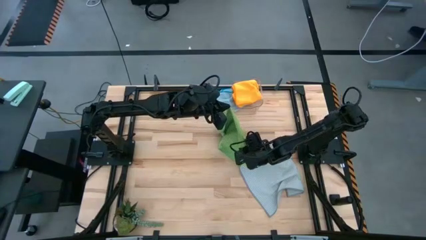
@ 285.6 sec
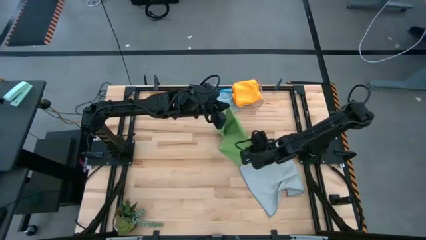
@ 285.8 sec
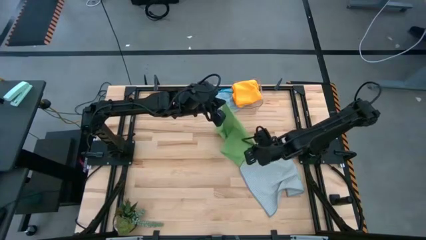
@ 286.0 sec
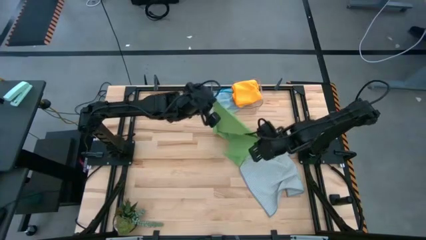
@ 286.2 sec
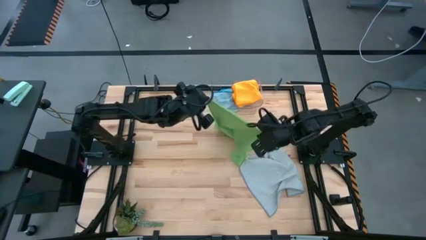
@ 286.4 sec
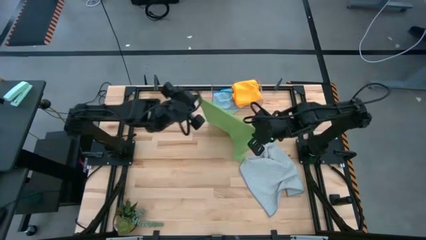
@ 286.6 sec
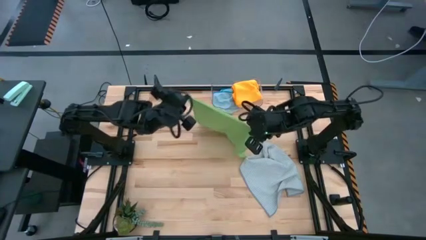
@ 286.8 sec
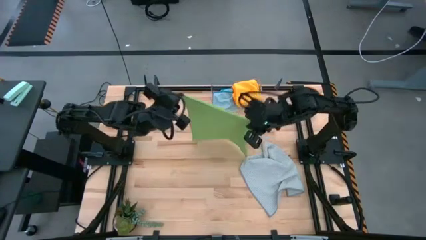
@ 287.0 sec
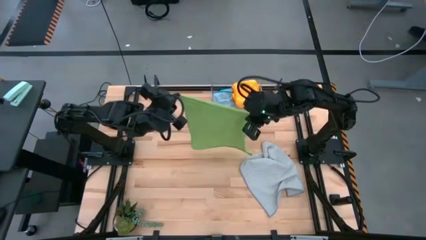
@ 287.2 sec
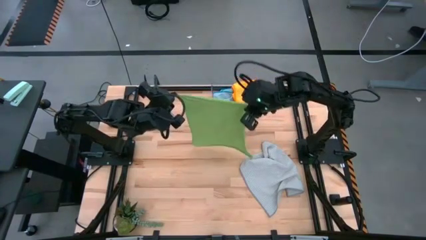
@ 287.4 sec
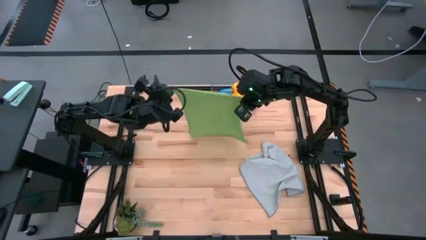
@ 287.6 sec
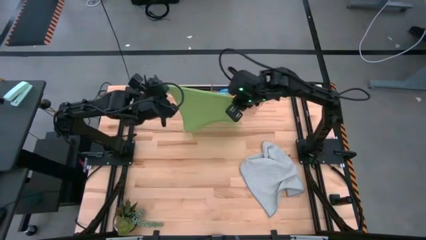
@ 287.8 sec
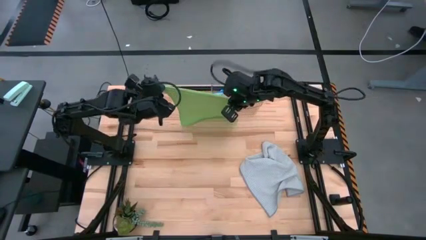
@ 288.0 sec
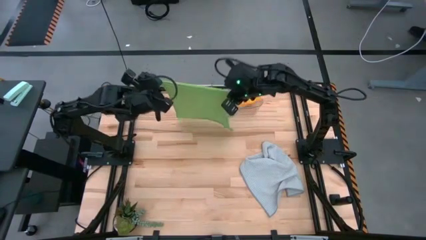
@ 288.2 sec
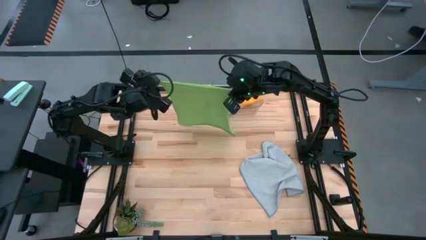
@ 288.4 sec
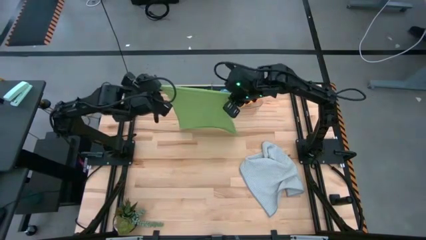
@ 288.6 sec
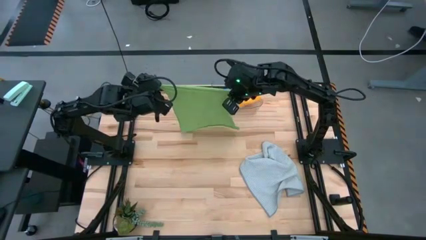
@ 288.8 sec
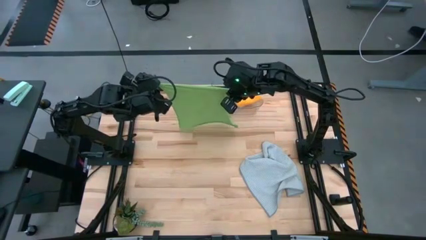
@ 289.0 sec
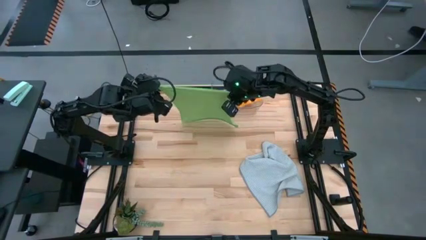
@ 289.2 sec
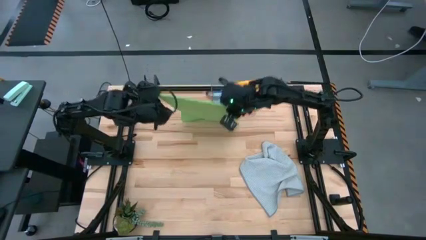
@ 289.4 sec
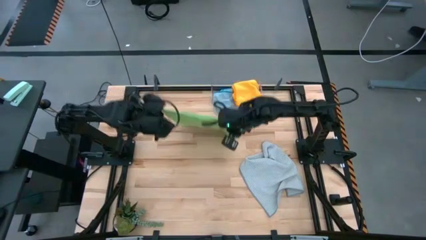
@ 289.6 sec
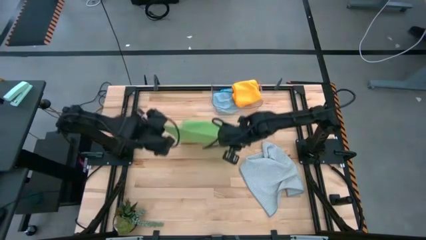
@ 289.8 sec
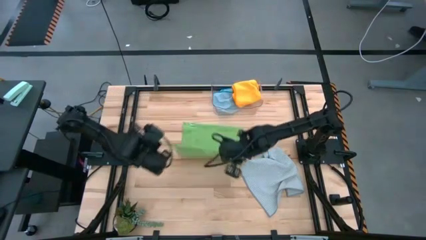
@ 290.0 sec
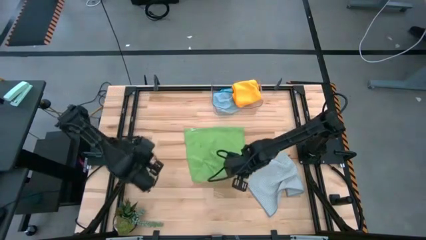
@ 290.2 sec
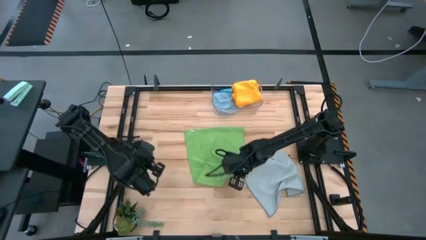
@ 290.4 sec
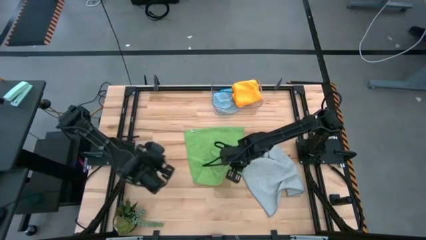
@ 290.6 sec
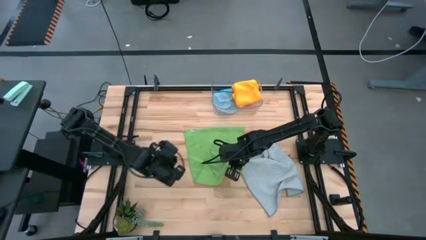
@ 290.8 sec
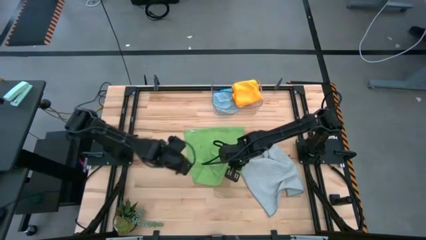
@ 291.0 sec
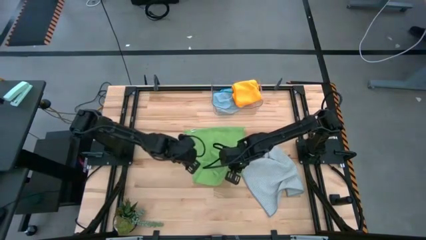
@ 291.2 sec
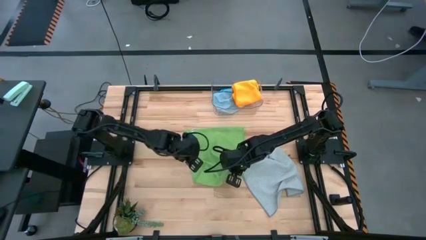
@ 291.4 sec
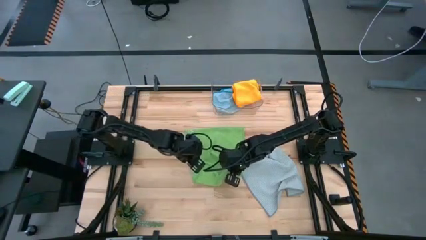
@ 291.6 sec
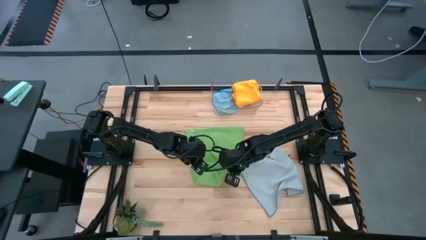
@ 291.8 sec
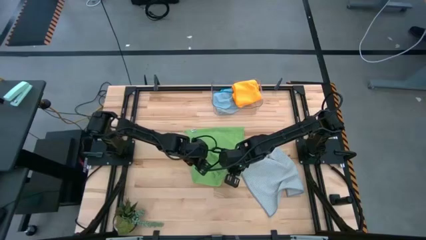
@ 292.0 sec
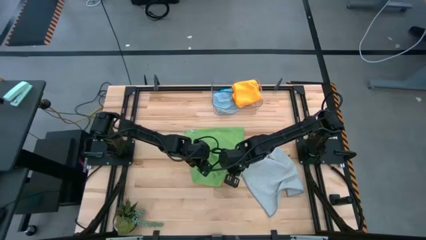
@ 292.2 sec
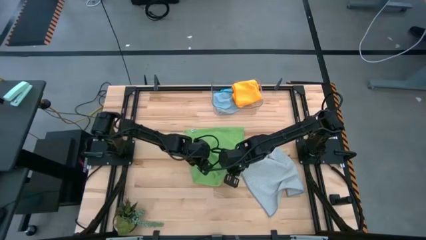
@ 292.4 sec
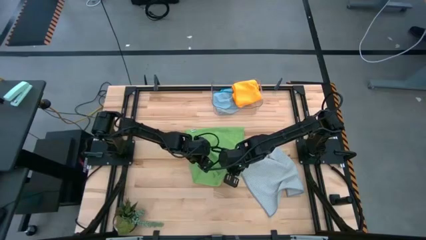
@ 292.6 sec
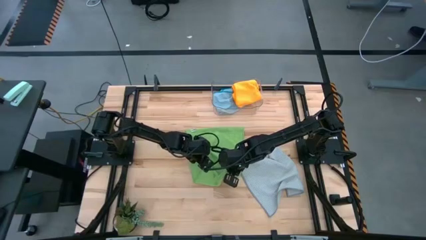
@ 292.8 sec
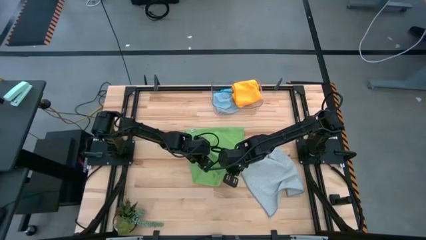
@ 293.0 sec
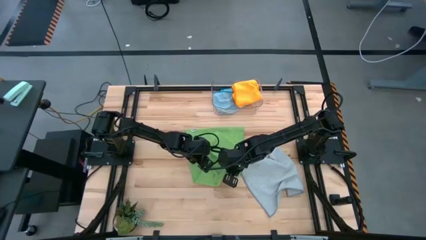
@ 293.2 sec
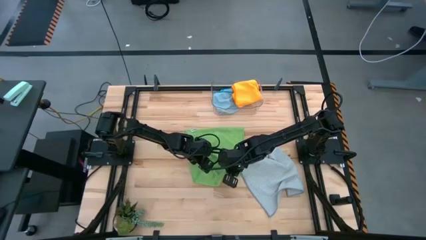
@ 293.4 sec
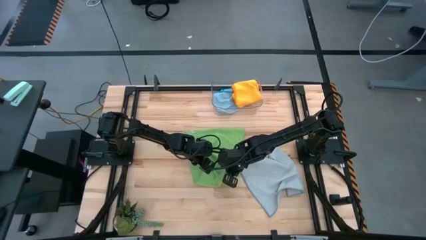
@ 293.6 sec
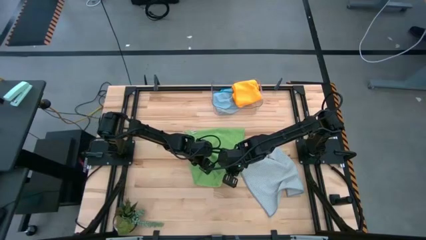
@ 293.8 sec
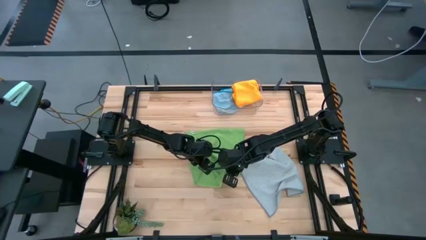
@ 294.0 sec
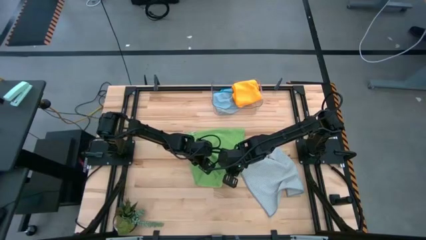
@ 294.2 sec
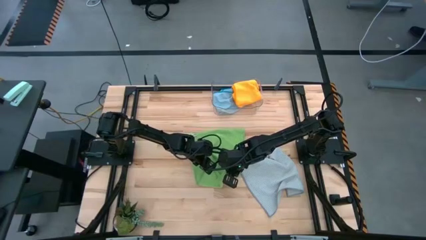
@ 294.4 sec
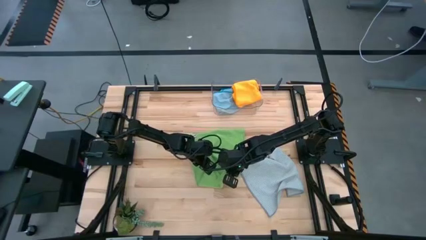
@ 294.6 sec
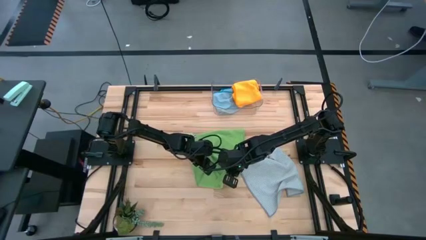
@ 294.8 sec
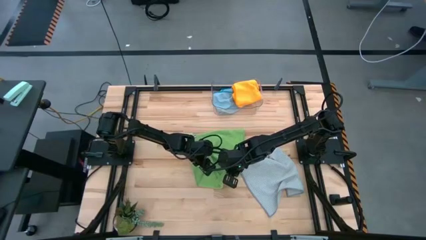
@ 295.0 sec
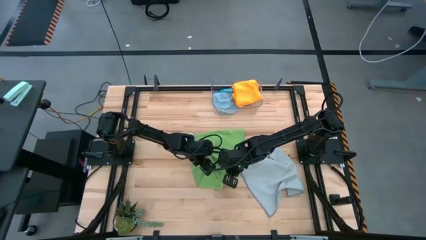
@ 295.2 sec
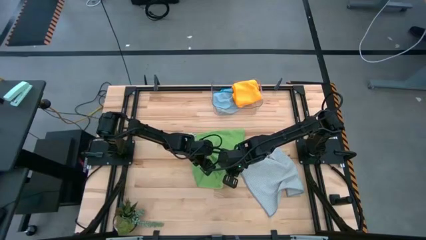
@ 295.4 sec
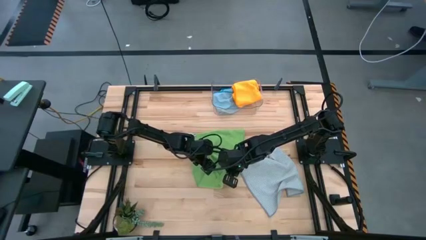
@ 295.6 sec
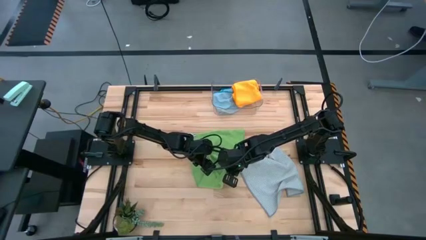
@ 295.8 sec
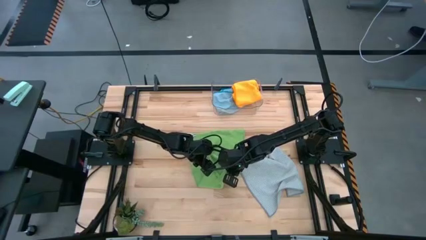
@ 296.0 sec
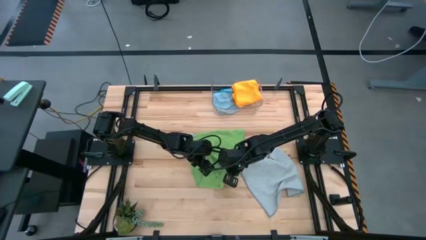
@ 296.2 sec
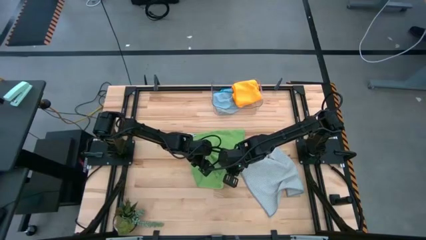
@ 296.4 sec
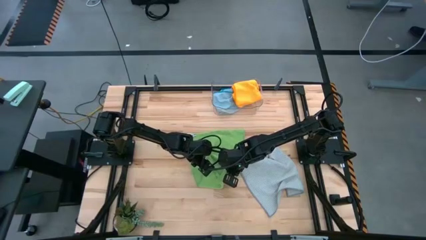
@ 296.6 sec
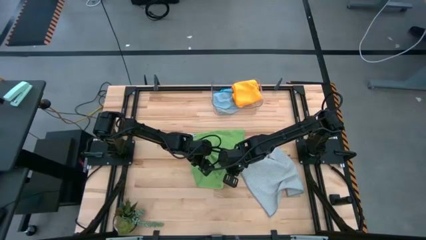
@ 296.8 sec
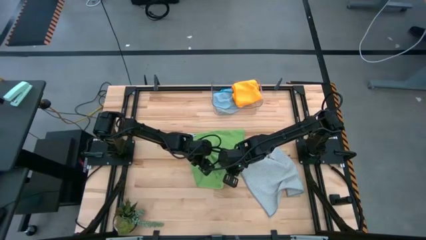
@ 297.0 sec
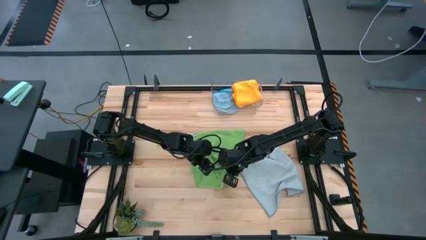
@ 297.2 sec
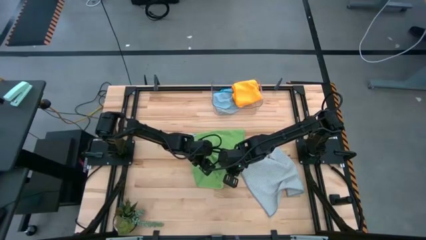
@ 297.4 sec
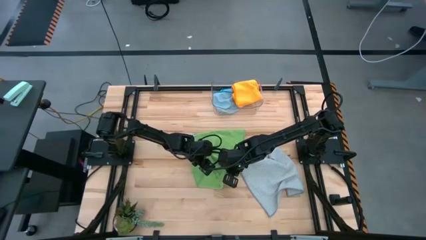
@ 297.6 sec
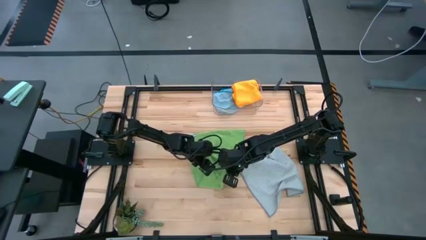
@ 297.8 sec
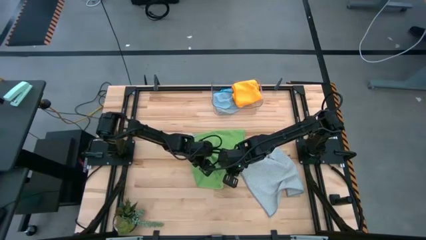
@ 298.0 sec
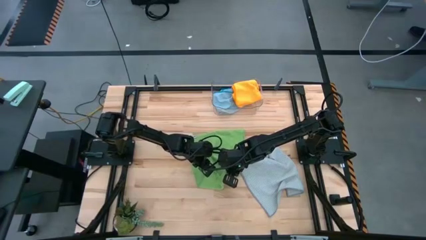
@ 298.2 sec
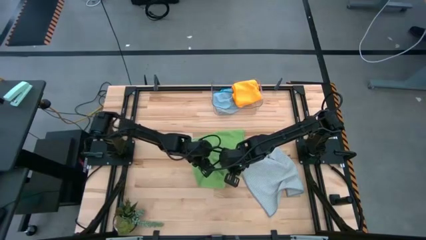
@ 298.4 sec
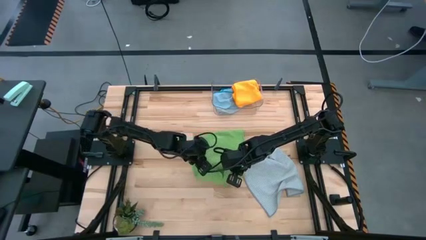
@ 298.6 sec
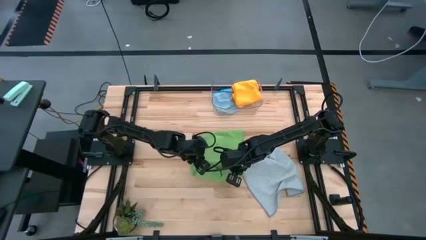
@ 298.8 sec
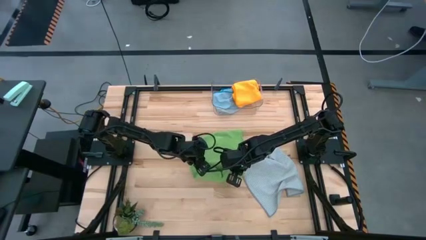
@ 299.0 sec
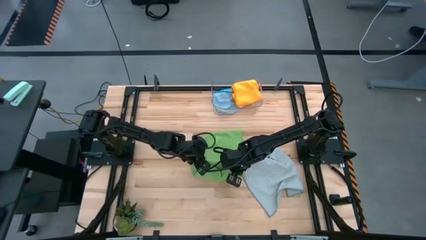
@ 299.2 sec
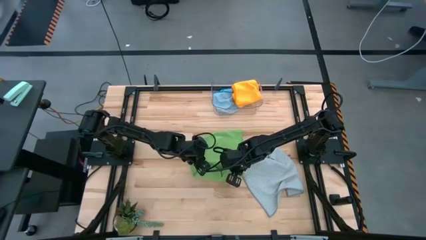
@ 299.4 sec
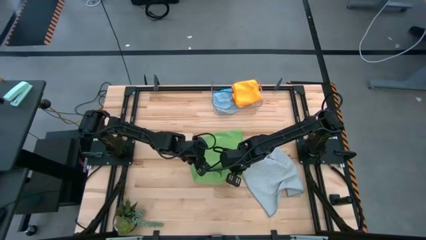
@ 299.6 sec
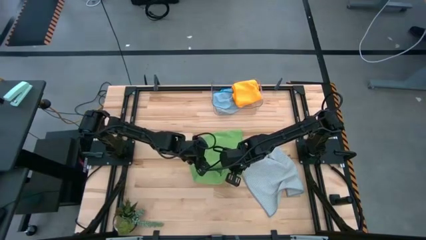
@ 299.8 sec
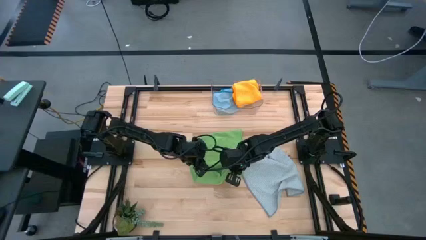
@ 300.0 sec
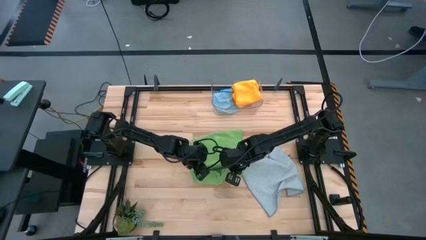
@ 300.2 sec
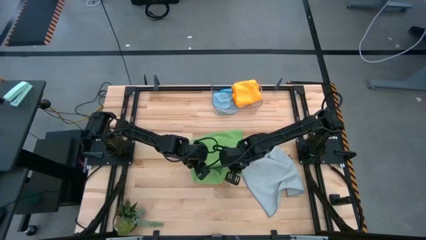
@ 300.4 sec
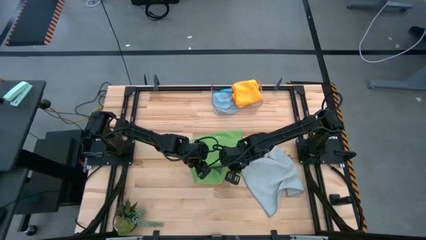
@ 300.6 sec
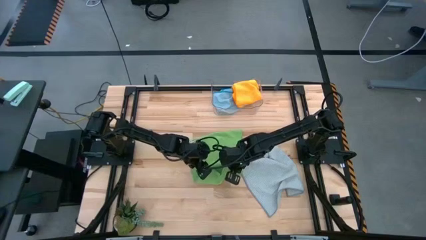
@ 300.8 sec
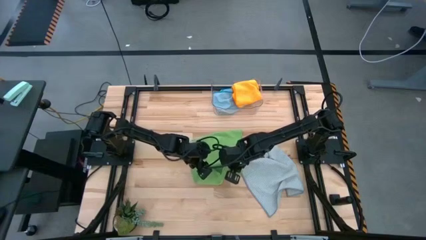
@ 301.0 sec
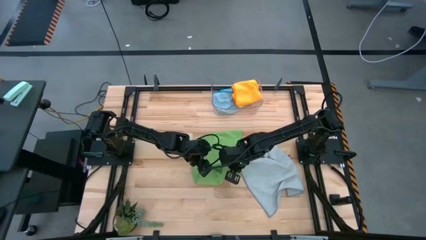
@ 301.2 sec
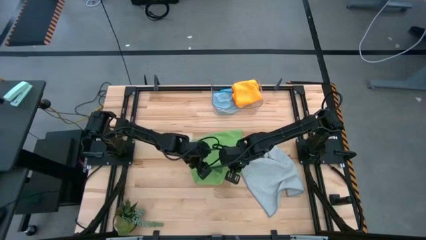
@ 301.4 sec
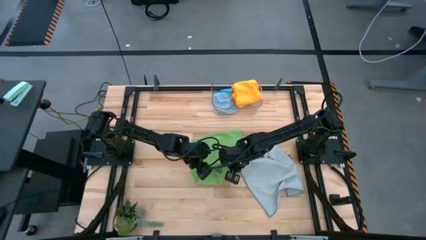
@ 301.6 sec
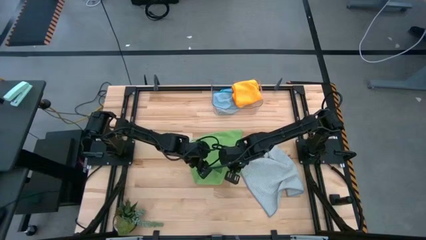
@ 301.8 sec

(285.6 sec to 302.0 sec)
Task: Fold microfiber towels
Fold the green microfiber cloth
